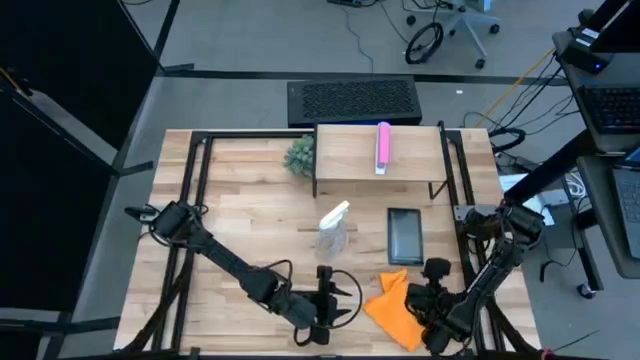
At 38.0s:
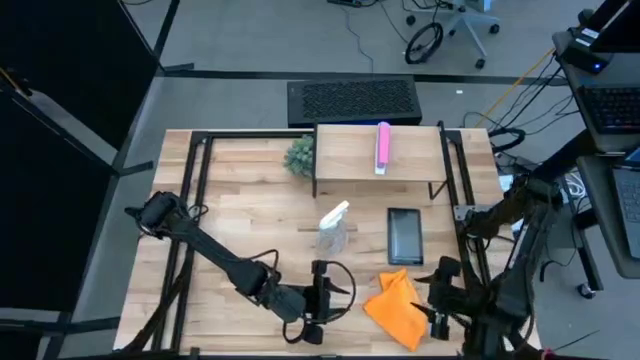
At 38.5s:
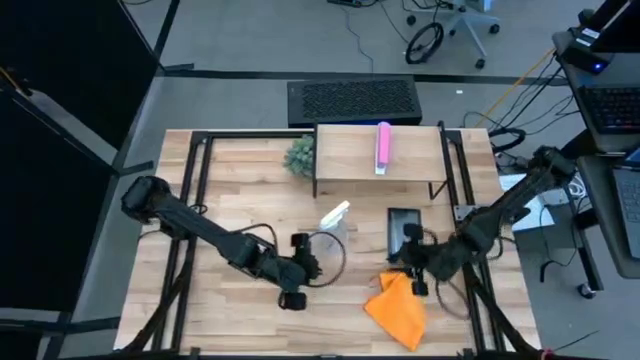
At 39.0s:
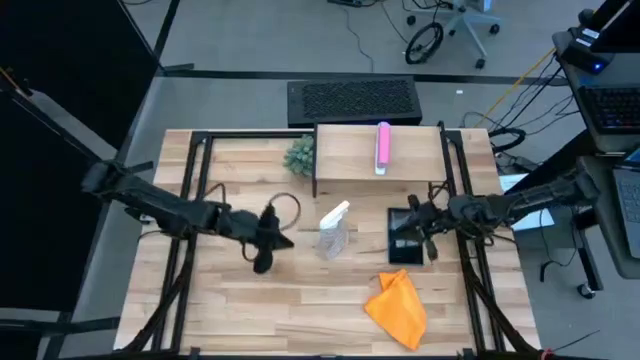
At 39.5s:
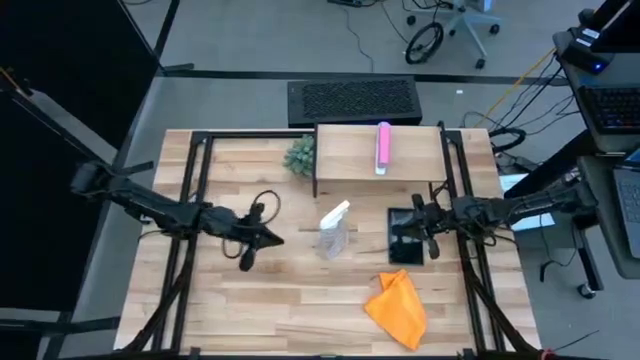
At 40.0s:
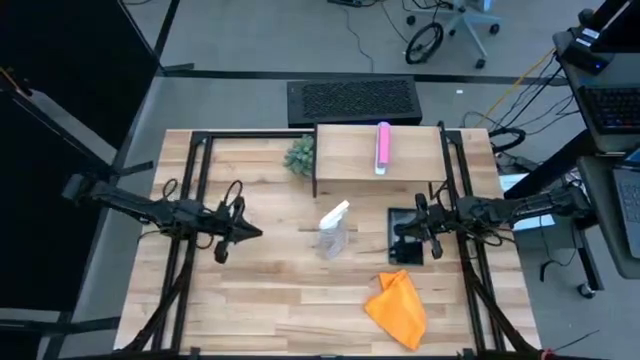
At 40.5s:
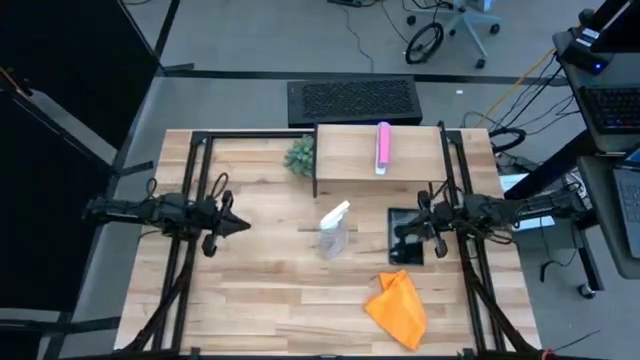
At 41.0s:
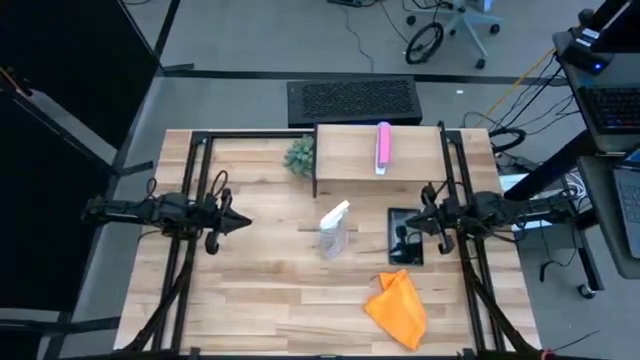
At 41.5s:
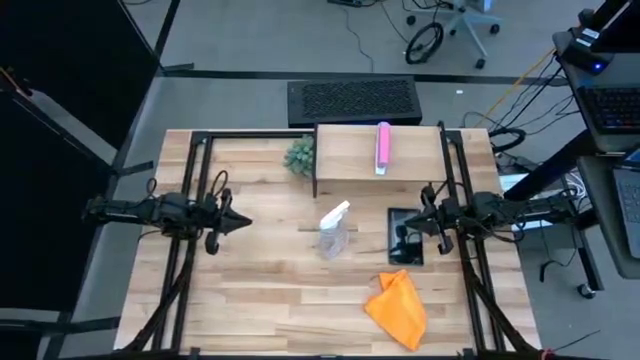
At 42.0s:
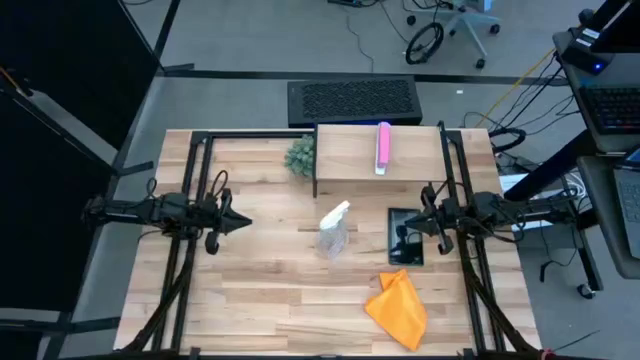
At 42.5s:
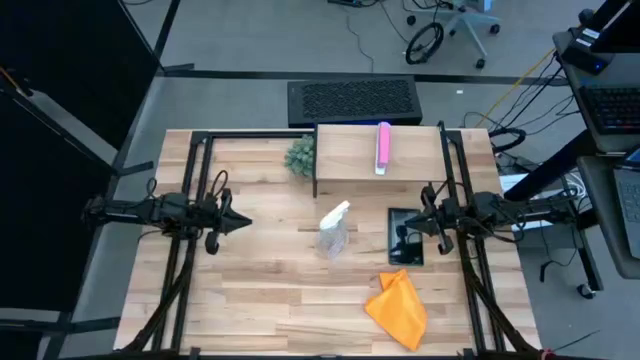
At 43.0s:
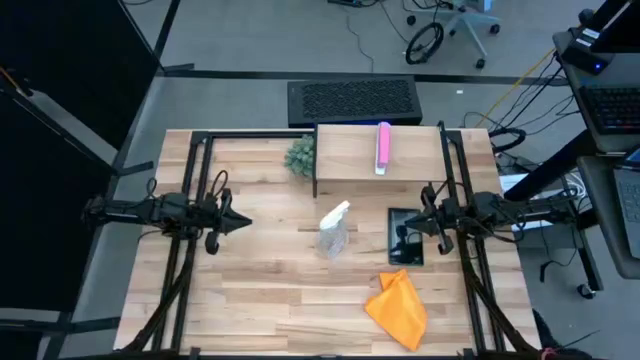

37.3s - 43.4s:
Task: Apply microfiber cloth
Return to Home Position

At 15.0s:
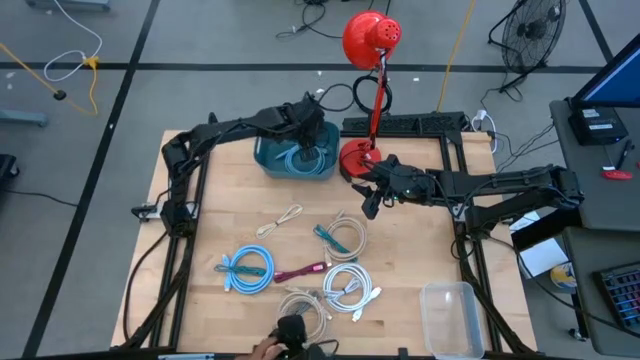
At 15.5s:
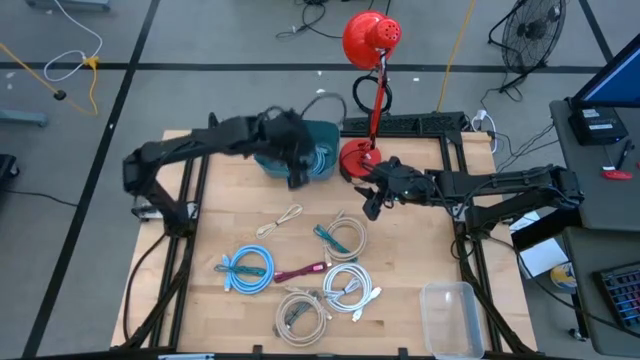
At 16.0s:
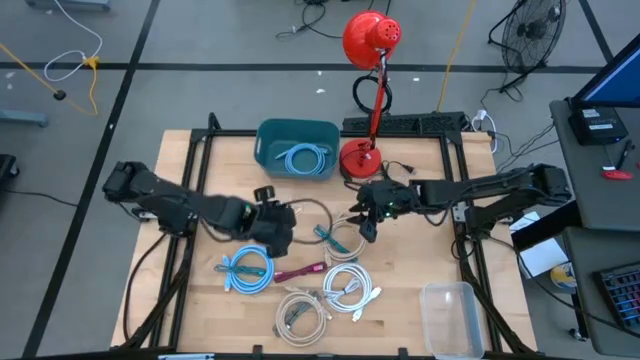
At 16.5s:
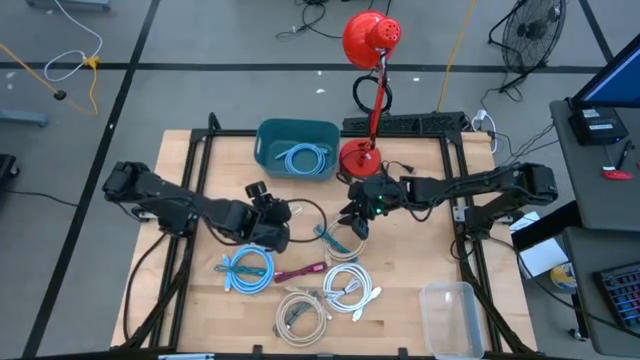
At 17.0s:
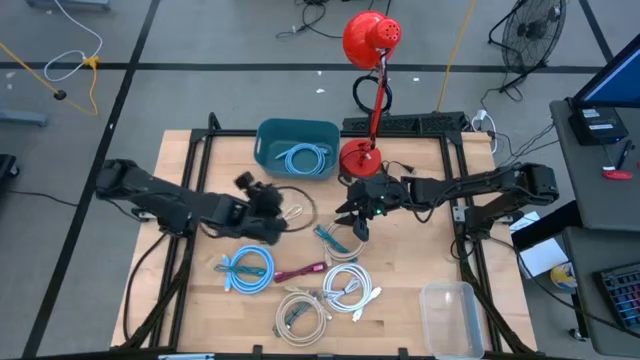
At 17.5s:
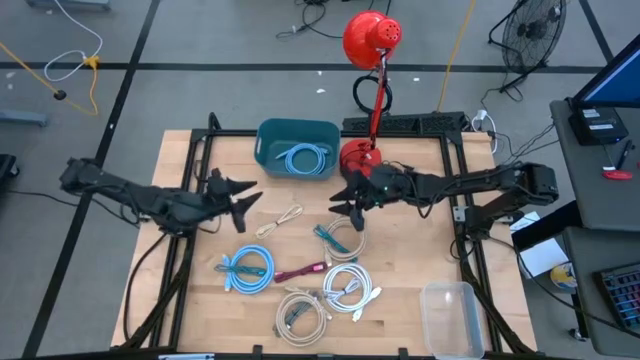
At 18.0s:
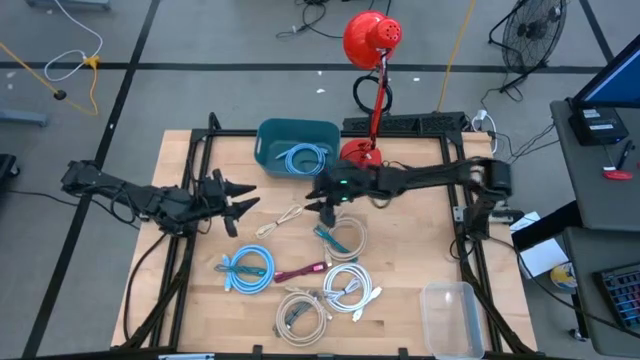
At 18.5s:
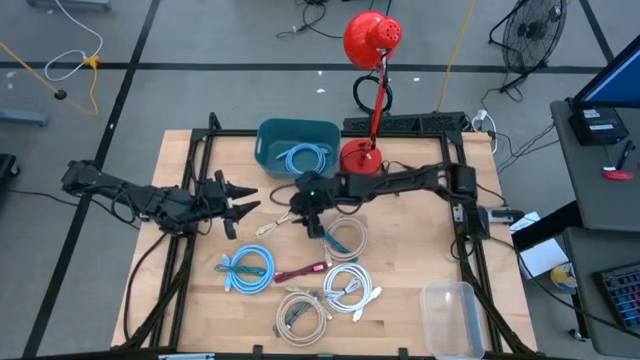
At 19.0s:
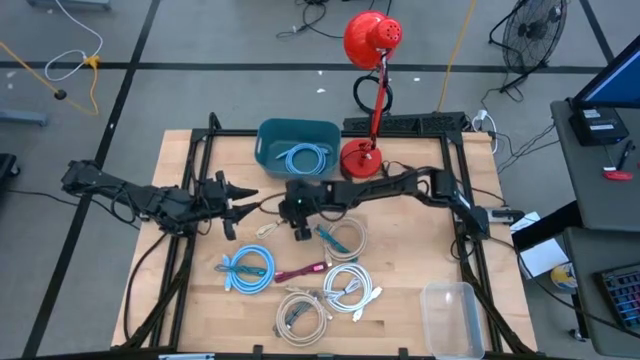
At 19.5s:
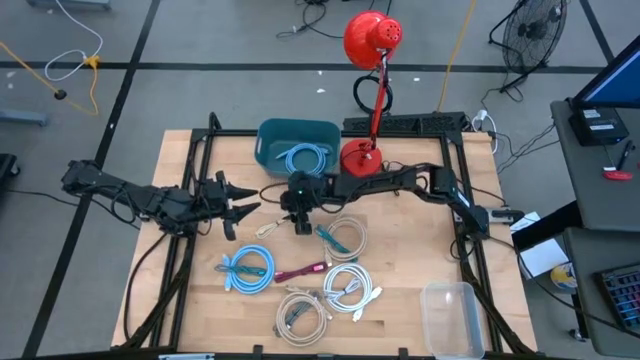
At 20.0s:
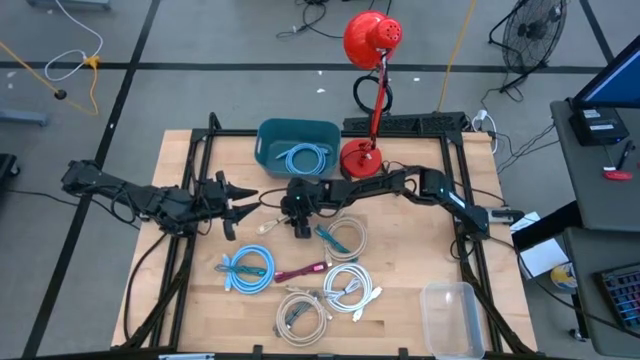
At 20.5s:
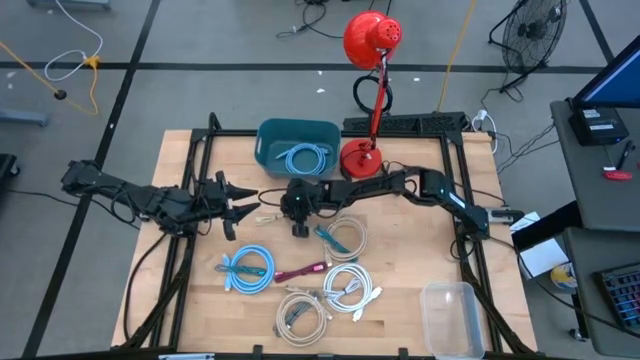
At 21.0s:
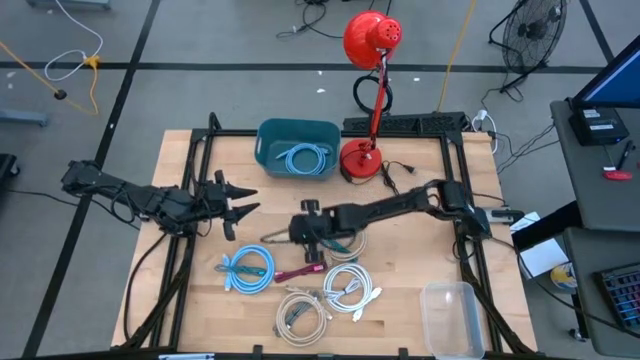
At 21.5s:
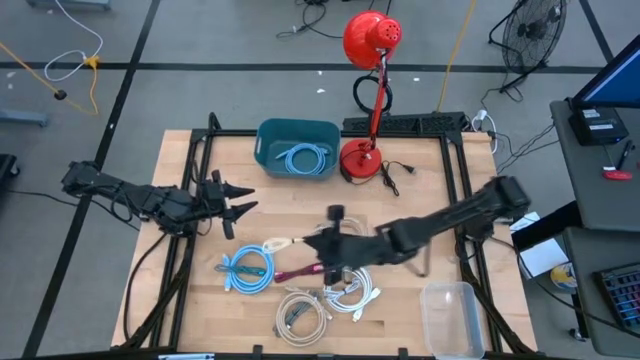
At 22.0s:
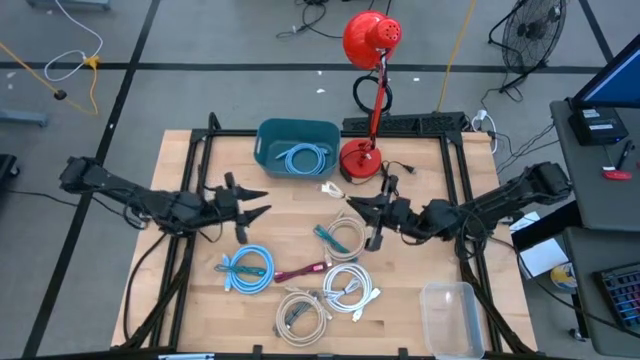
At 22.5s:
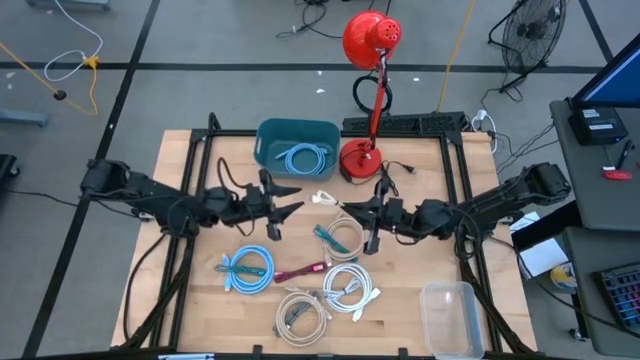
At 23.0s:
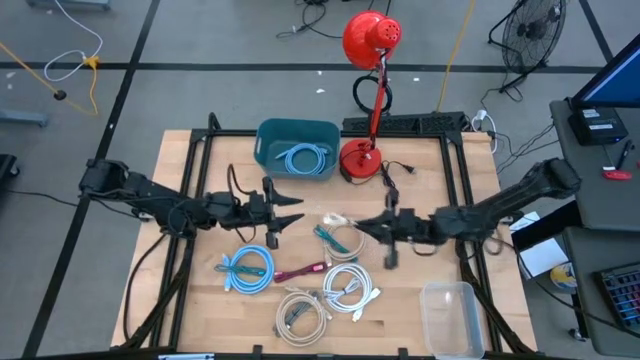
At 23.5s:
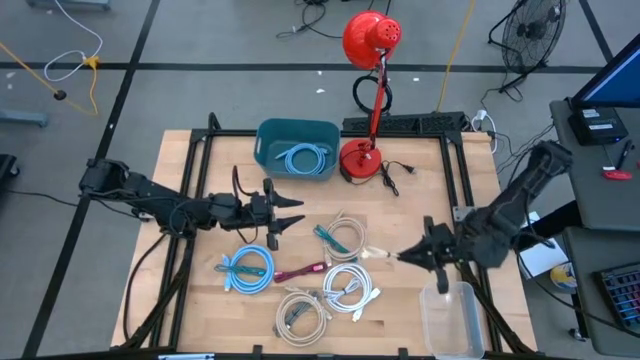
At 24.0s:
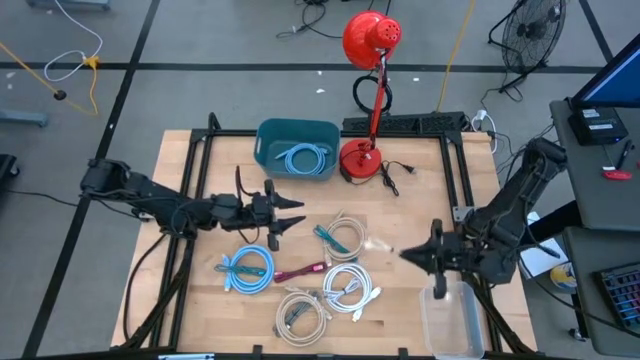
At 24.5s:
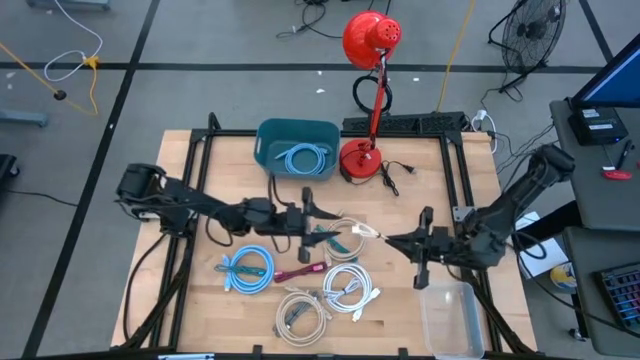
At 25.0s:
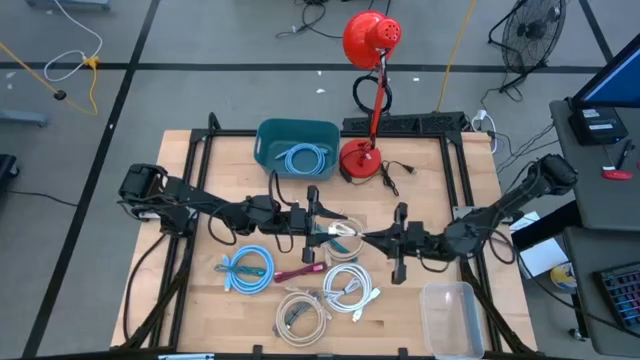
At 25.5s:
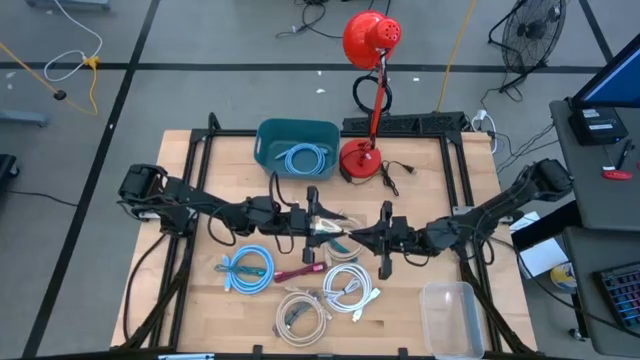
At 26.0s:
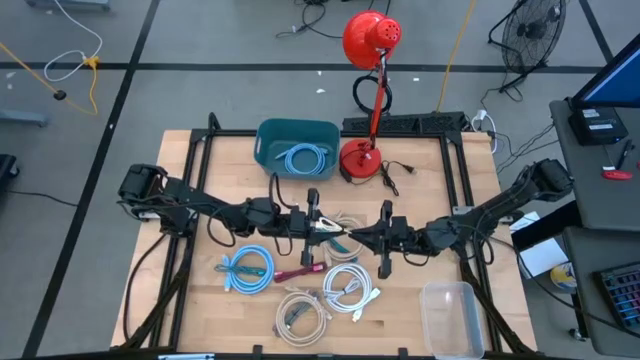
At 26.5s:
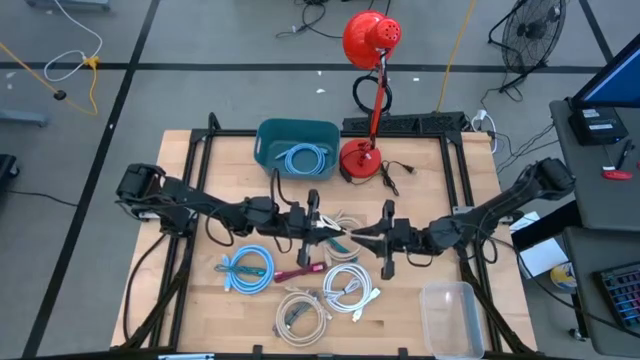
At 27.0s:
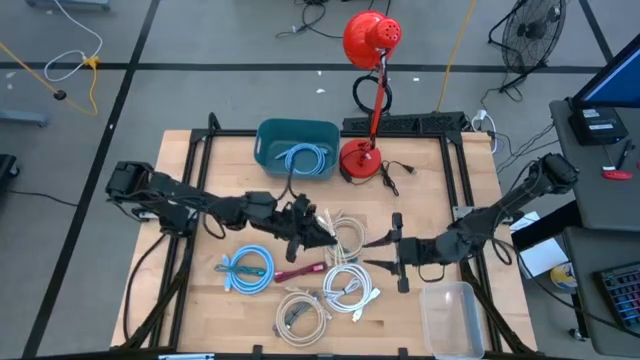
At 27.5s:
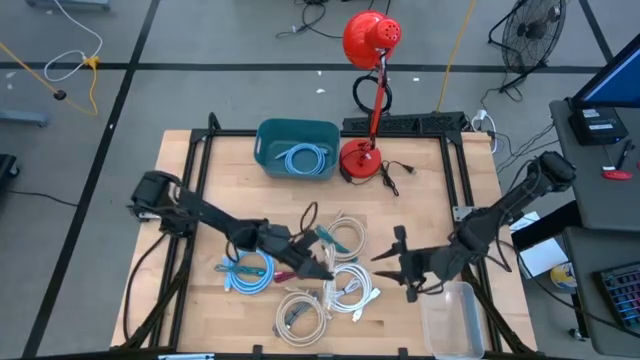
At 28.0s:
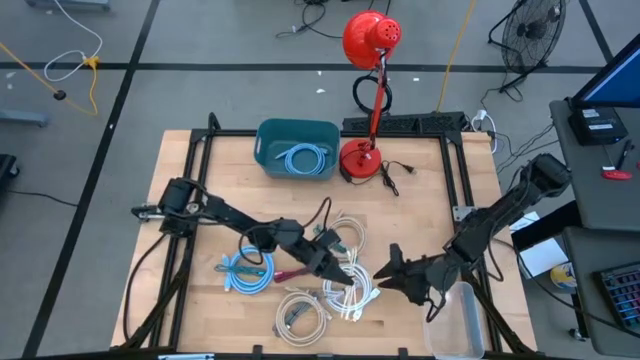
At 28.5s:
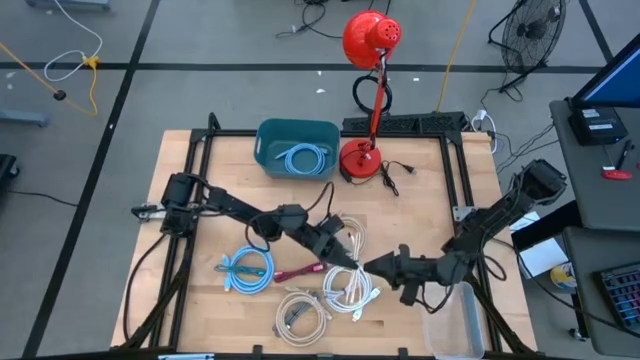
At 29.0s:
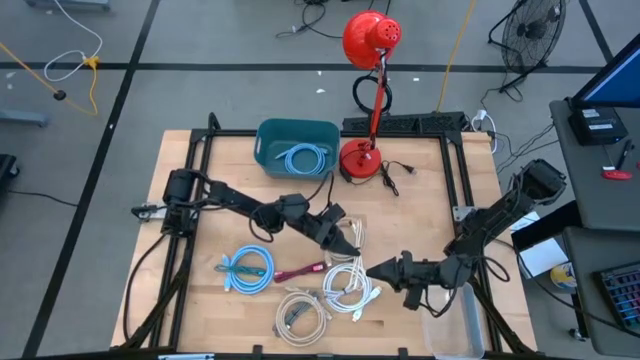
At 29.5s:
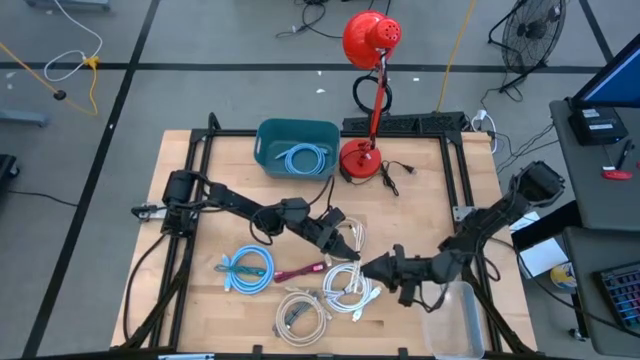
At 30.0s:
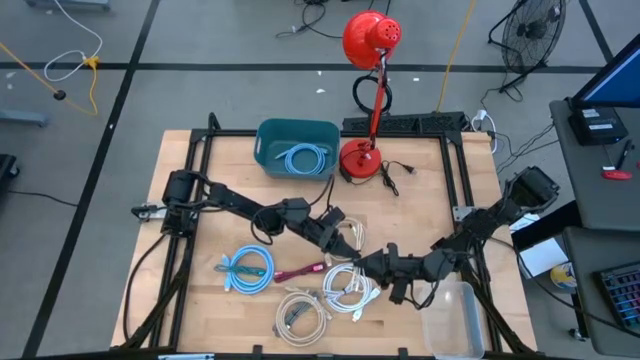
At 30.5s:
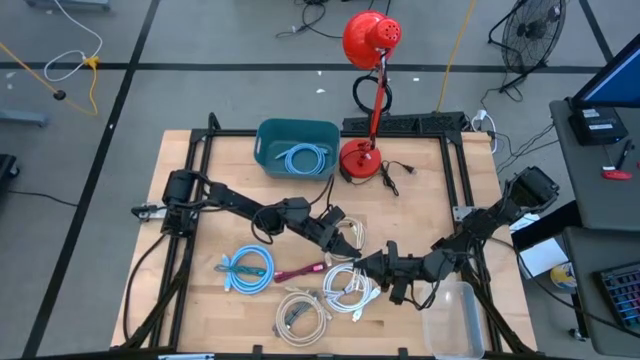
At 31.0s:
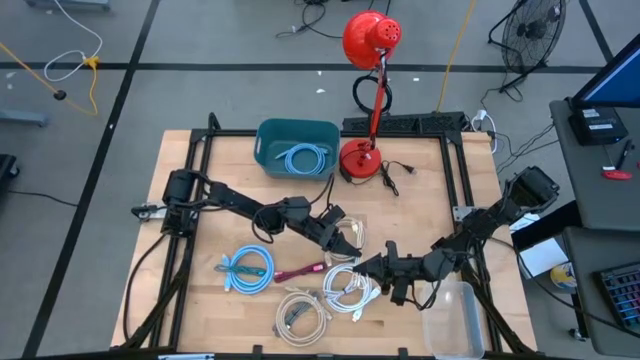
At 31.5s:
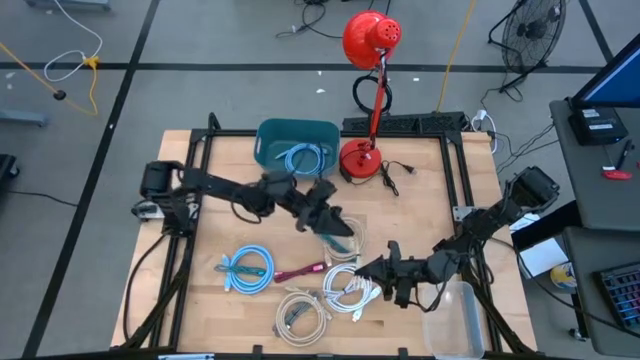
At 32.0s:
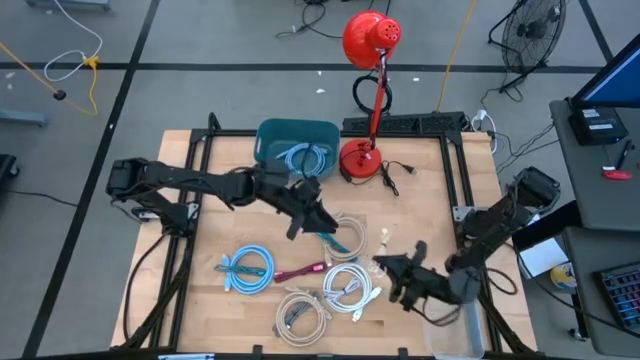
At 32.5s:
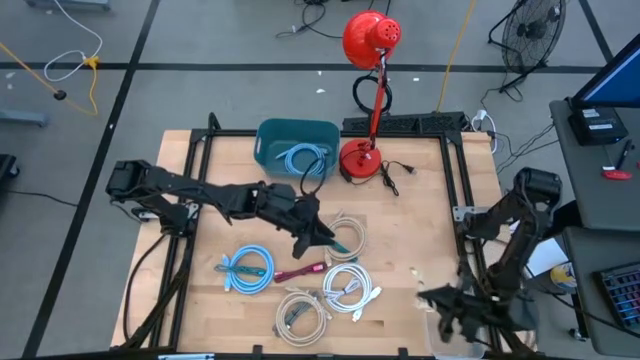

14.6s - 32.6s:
Task: Pick & Place USB Port
Put the light brown charger cable into the transparent bin
